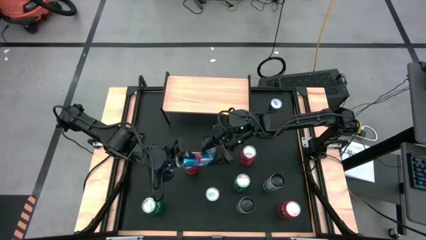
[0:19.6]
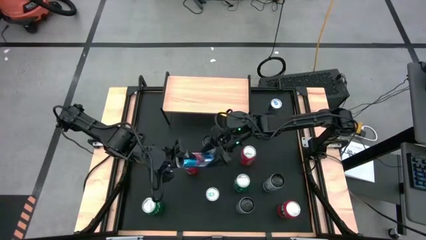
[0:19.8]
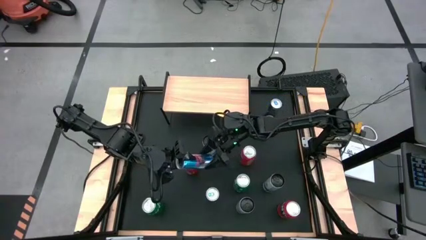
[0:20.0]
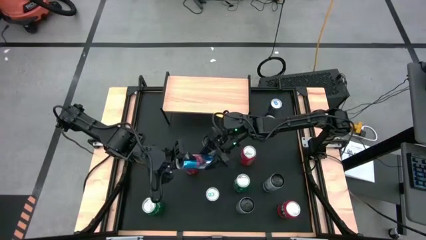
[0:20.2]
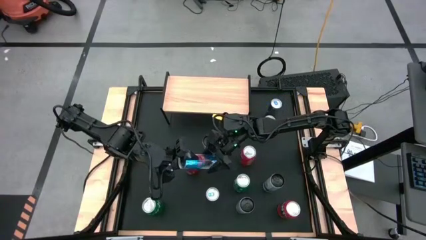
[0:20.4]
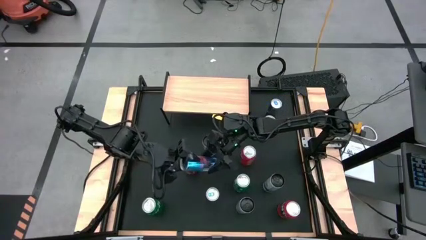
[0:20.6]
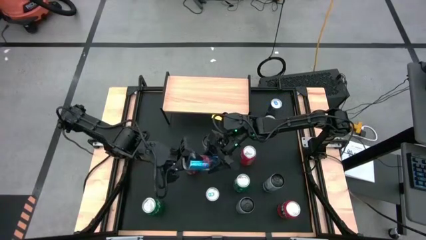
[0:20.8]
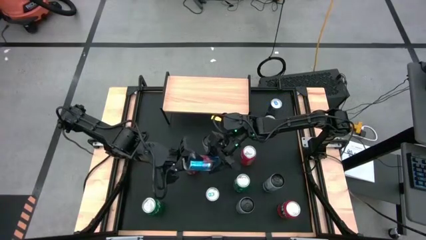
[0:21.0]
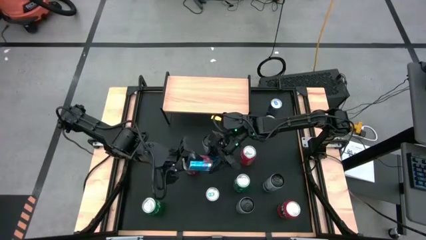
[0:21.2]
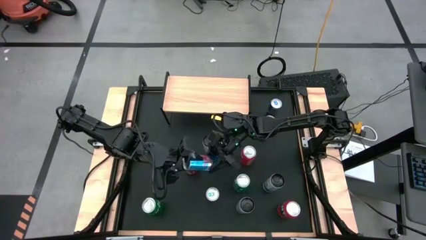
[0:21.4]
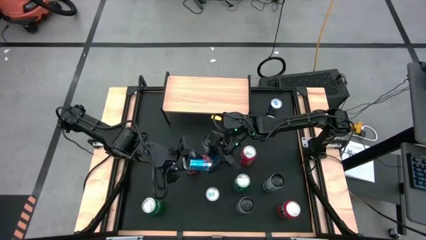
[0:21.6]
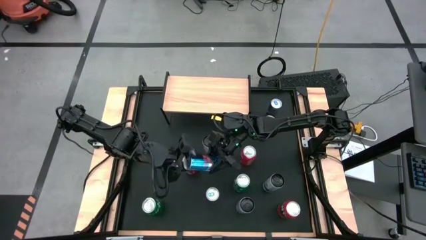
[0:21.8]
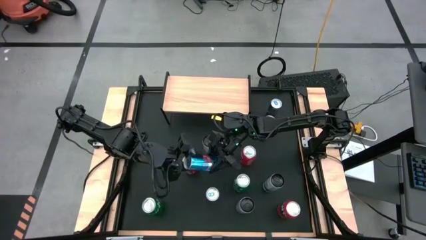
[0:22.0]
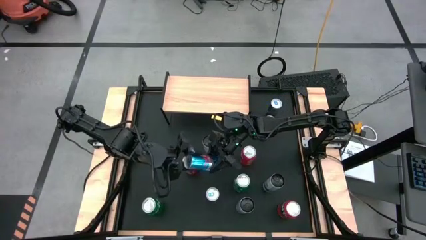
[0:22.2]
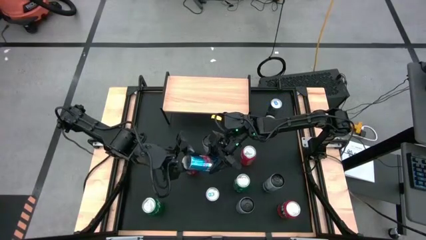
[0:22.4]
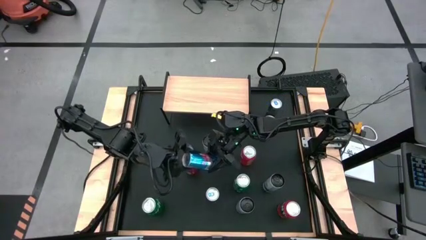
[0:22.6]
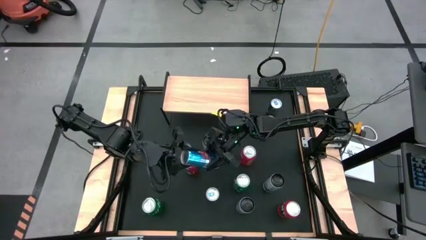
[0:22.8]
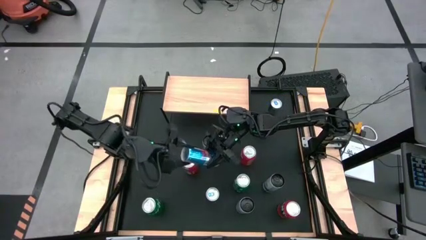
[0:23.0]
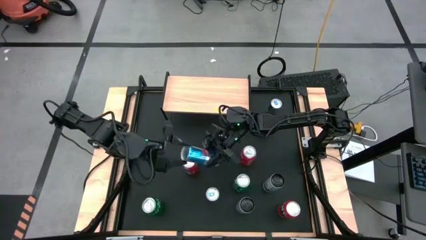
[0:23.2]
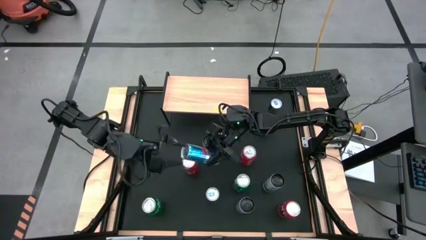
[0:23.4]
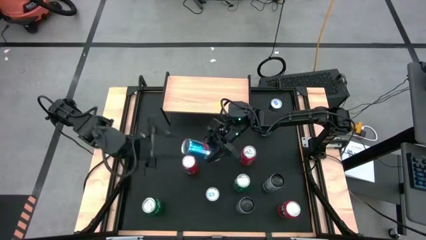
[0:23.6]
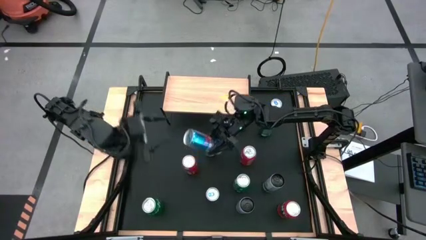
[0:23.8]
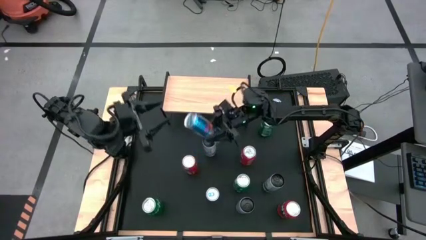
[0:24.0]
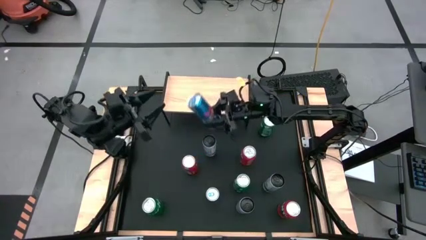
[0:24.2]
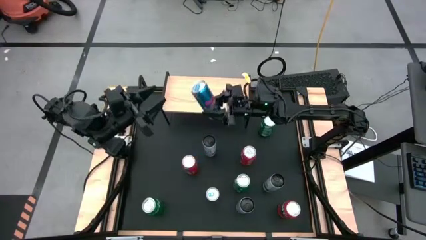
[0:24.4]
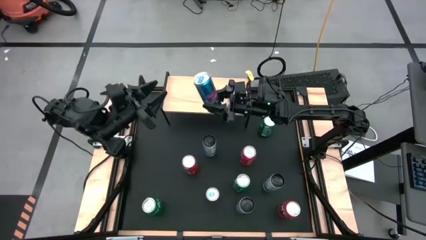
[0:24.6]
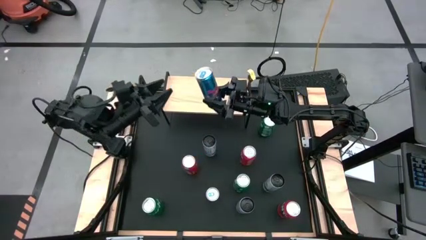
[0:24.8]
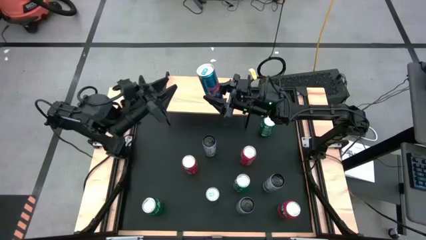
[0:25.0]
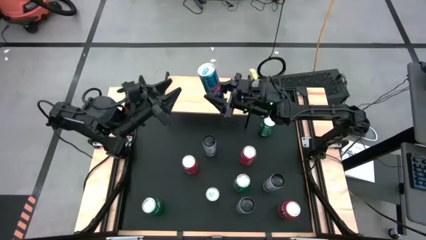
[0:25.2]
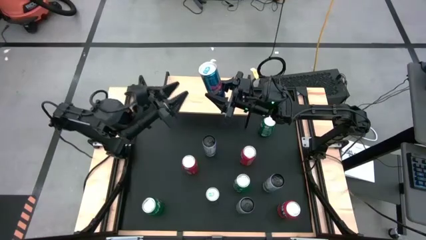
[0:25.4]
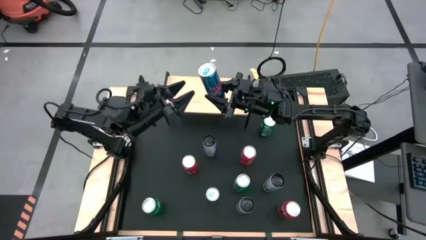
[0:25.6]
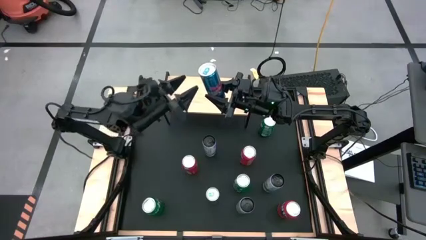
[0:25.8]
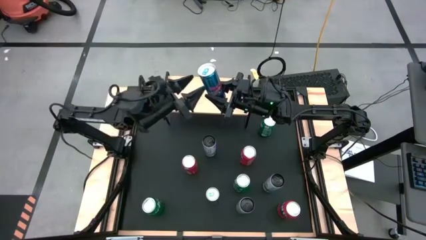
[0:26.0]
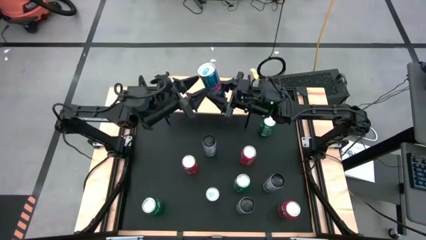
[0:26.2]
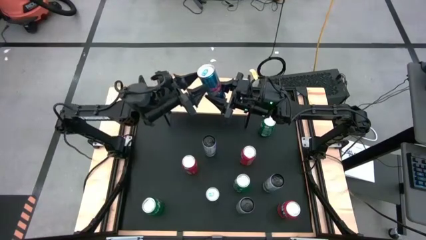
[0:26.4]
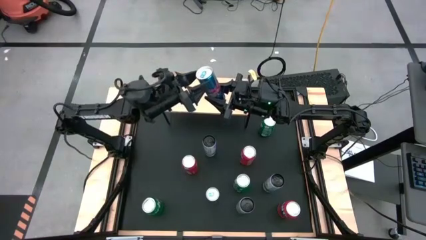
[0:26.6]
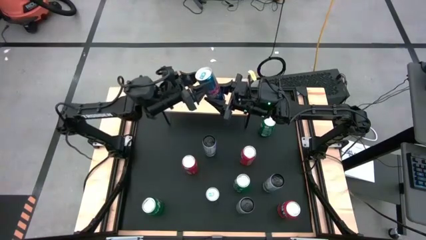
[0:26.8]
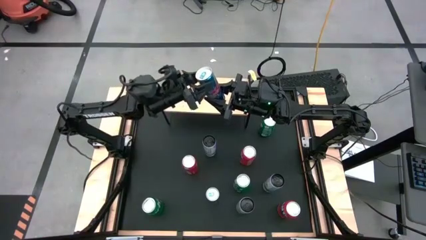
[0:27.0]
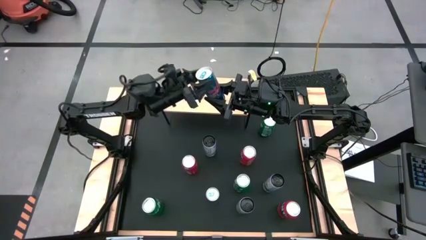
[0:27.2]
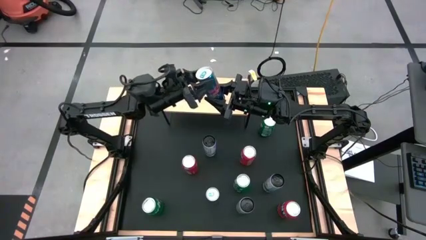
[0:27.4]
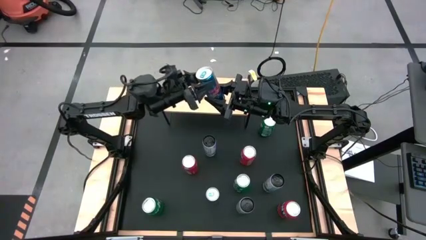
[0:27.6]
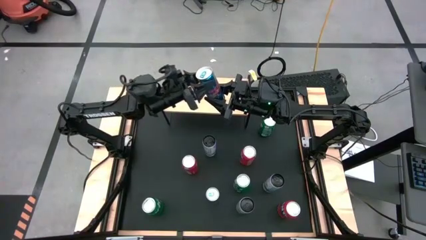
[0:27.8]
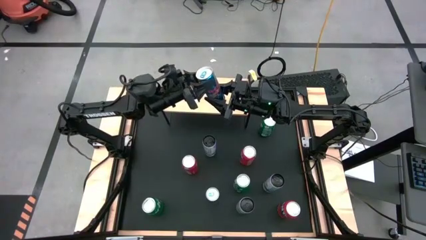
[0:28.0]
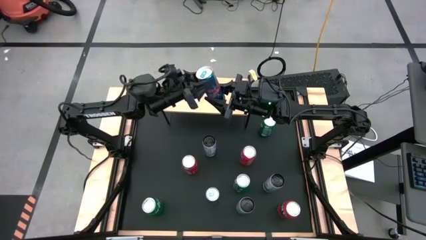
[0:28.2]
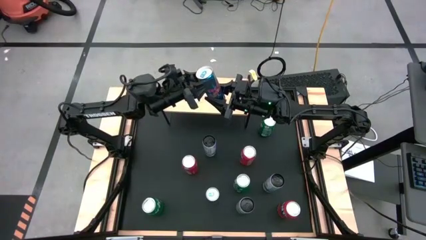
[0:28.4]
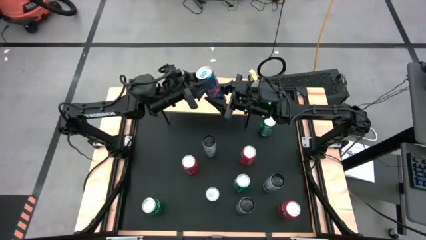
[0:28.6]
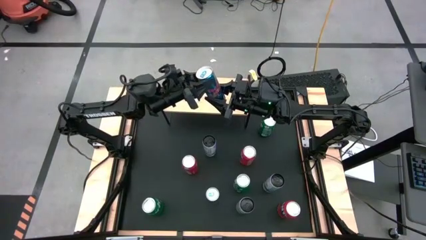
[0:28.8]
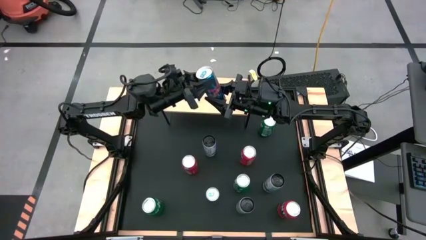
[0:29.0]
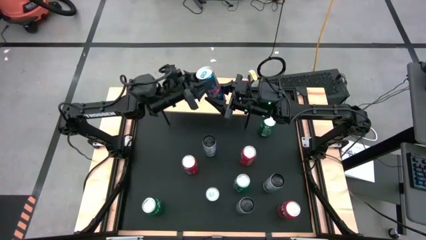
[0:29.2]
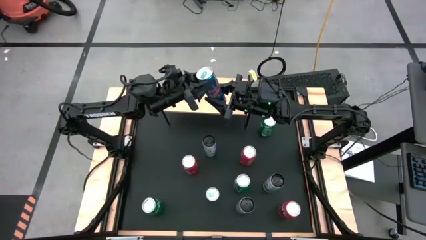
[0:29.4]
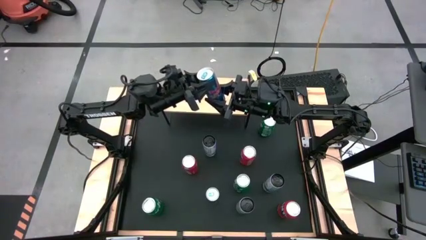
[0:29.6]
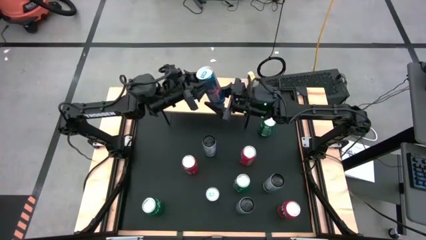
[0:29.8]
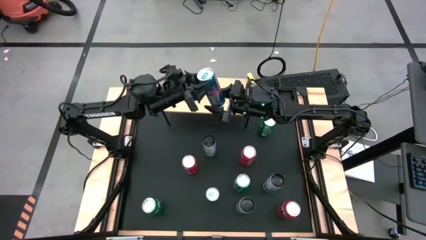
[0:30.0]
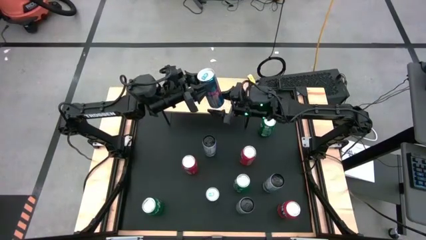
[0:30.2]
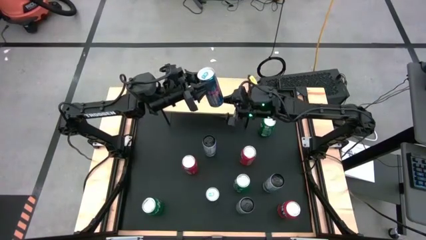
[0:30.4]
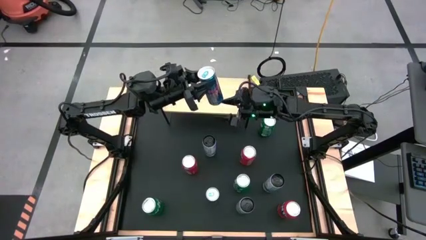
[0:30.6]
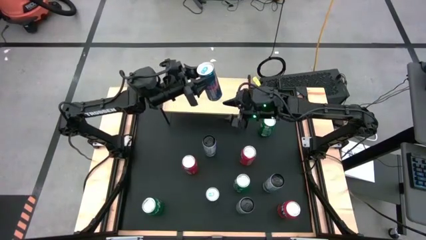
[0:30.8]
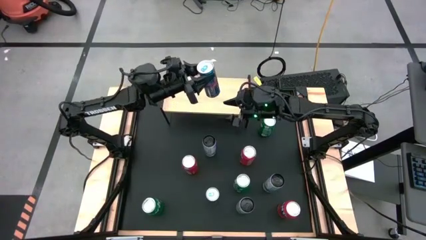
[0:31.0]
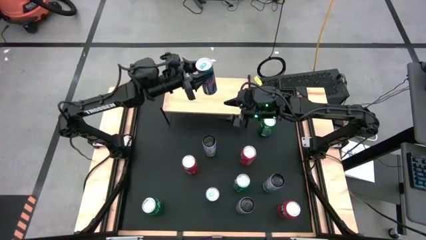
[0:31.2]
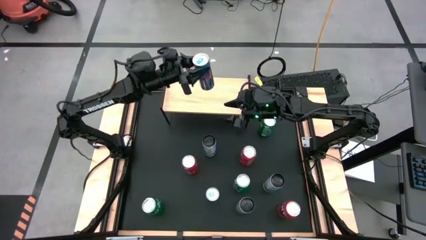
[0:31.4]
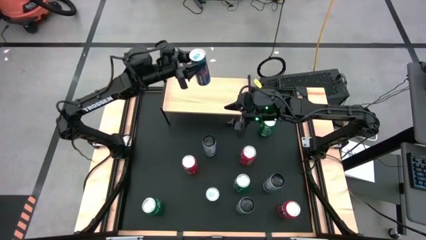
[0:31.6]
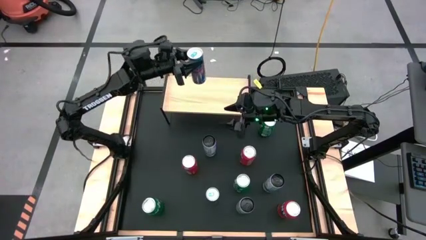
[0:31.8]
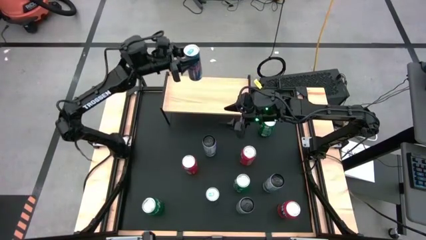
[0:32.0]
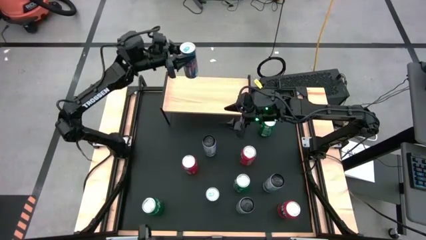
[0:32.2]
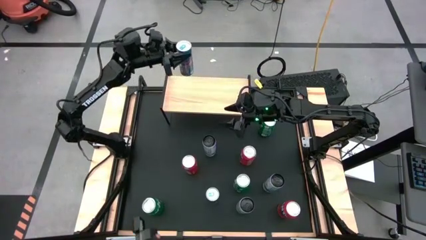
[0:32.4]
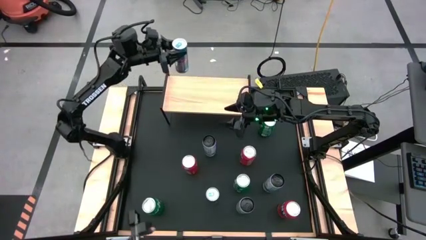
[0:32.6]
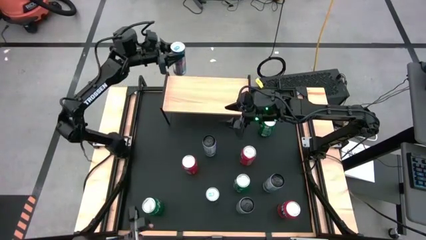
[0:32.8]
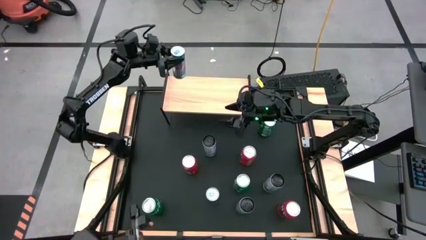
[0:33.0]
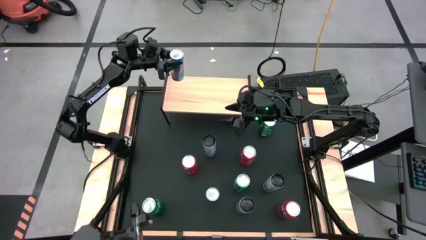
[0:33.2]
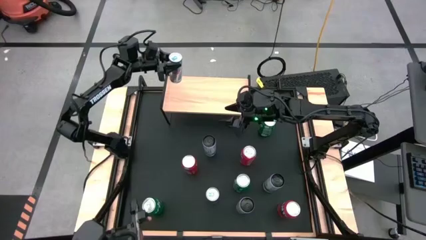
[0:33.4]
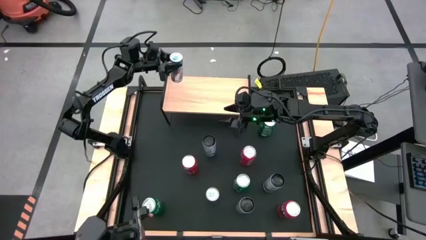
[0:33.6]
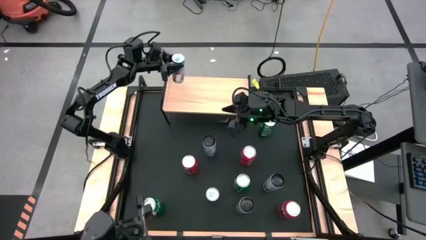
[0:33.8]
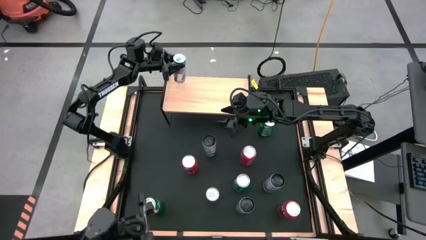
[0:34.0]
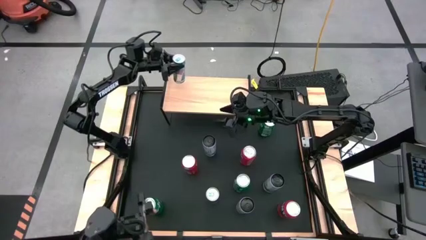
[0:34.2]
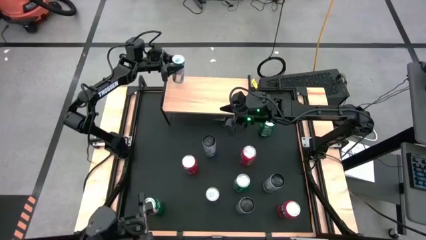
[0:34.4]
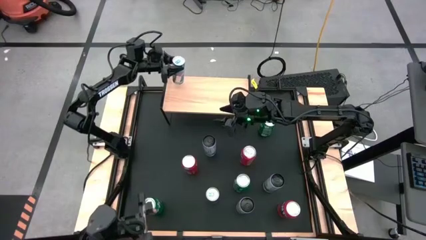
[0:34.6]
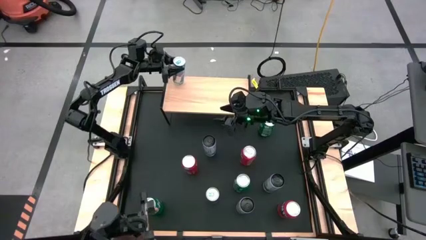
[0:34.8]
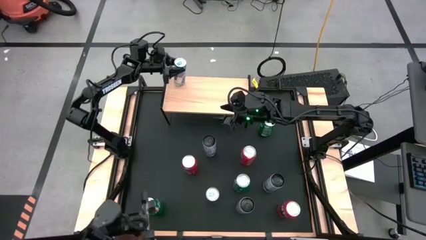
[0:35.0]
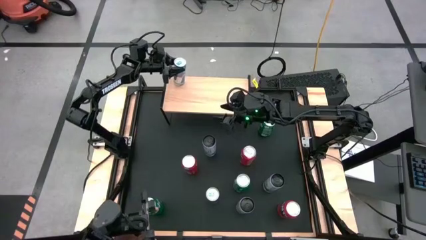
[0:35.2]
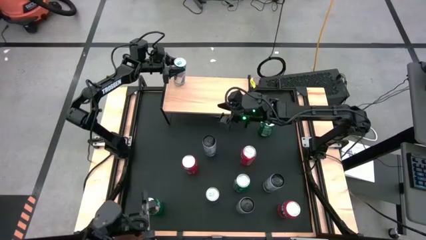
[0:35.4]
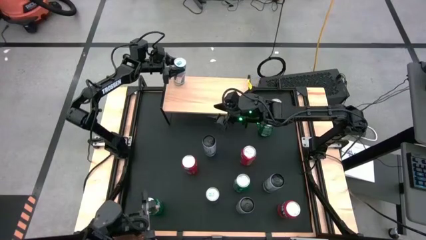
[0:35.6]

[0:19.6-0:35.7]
Task: Place canned beverage on shelf
Put the bottom left blue soda can on the shelf
